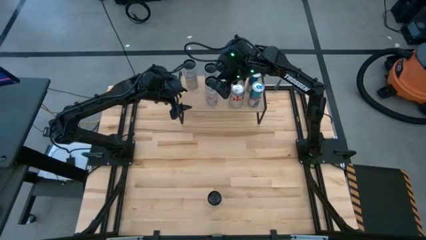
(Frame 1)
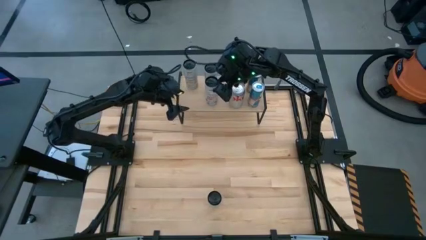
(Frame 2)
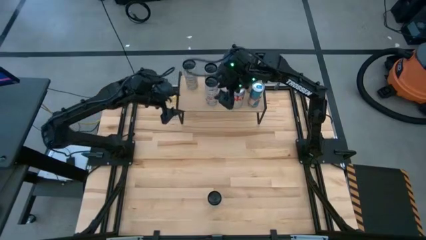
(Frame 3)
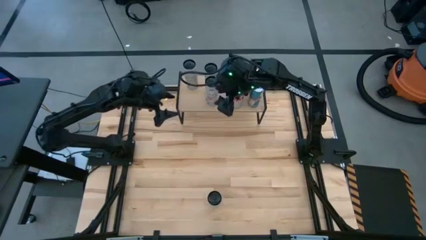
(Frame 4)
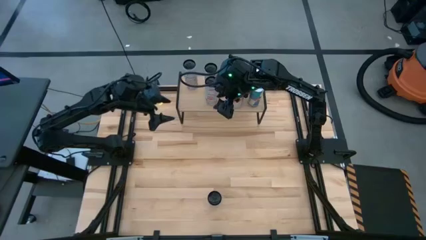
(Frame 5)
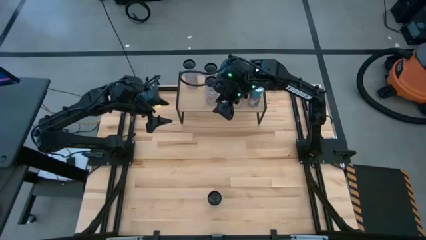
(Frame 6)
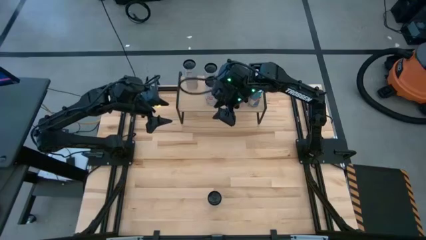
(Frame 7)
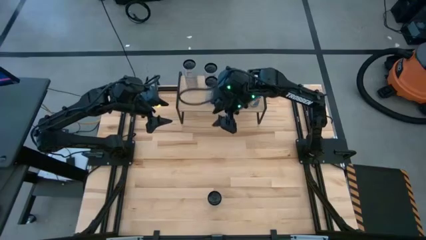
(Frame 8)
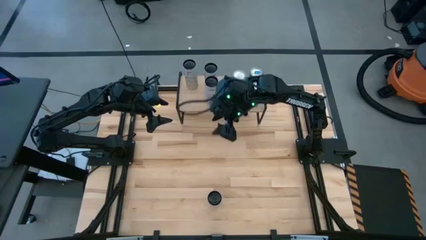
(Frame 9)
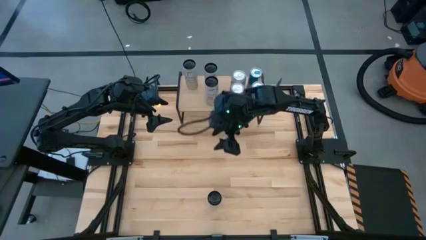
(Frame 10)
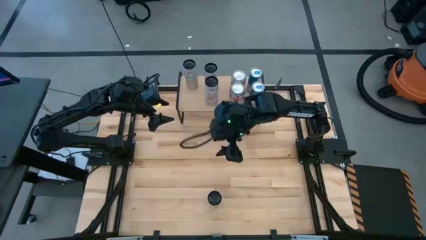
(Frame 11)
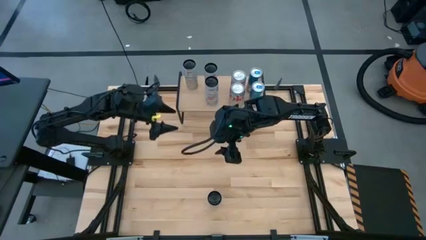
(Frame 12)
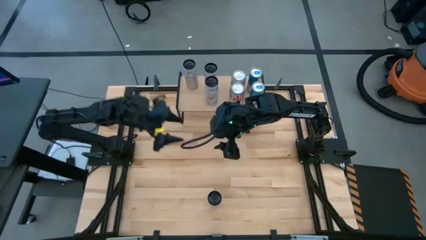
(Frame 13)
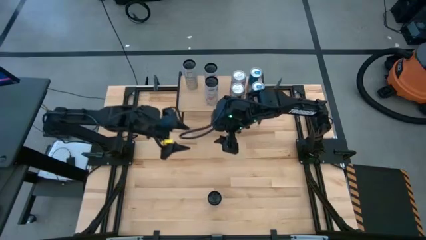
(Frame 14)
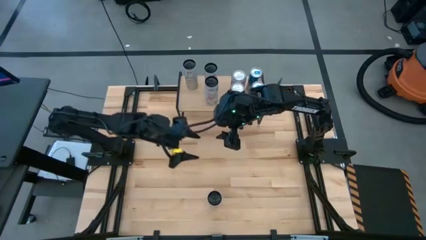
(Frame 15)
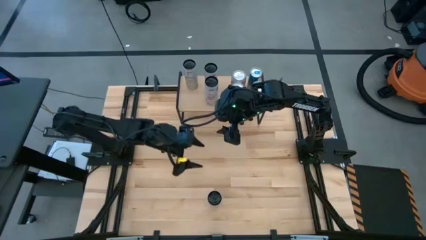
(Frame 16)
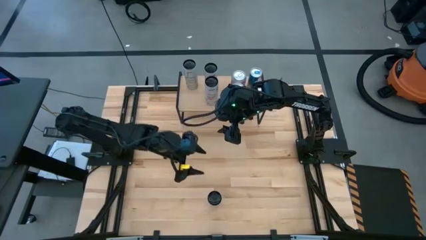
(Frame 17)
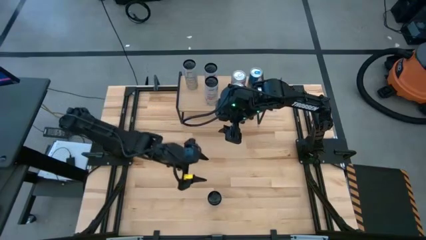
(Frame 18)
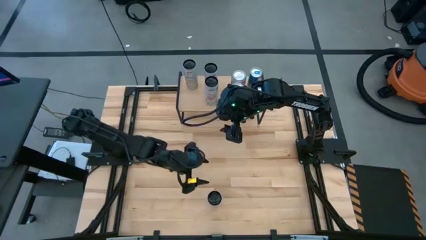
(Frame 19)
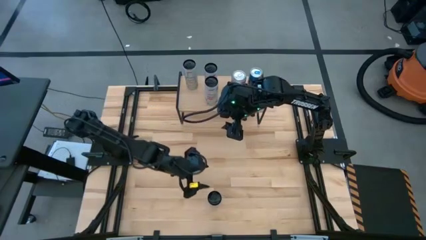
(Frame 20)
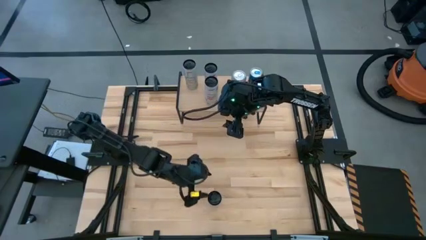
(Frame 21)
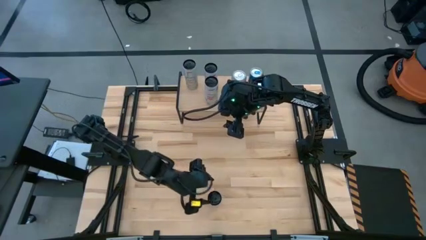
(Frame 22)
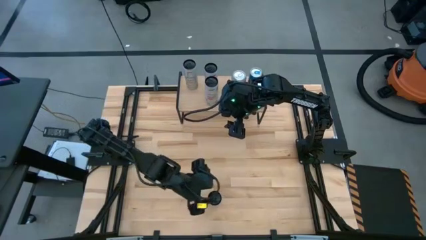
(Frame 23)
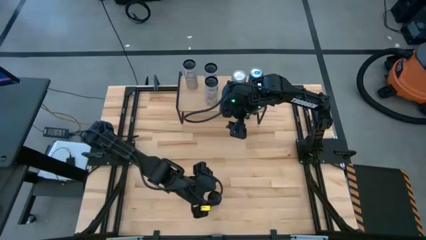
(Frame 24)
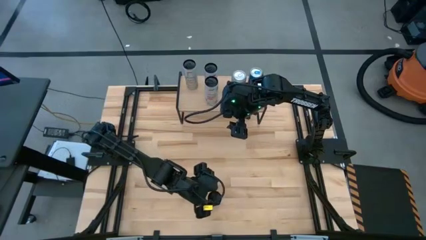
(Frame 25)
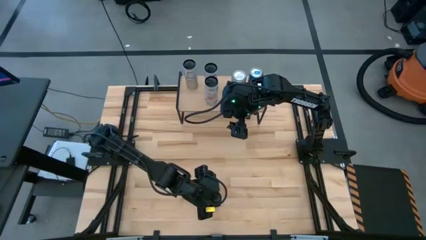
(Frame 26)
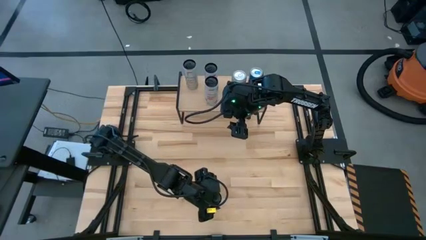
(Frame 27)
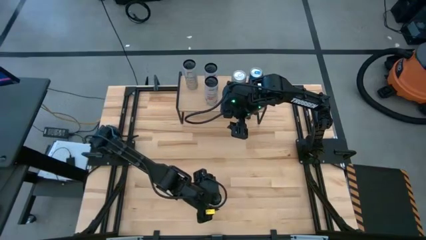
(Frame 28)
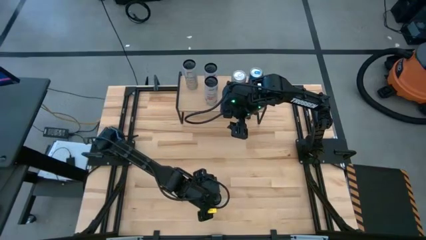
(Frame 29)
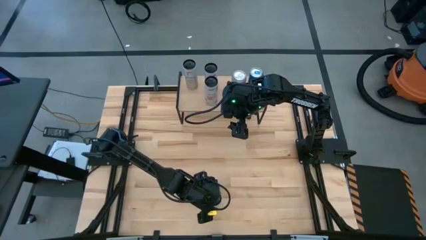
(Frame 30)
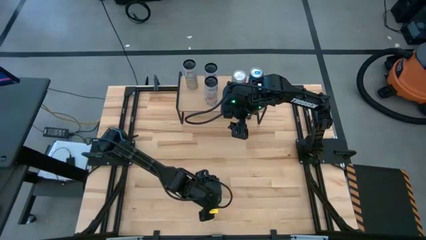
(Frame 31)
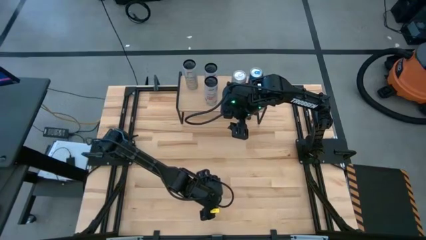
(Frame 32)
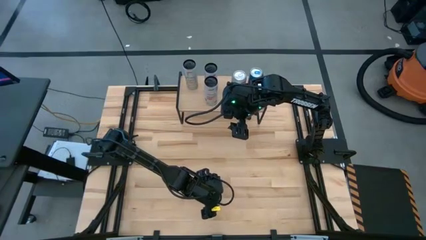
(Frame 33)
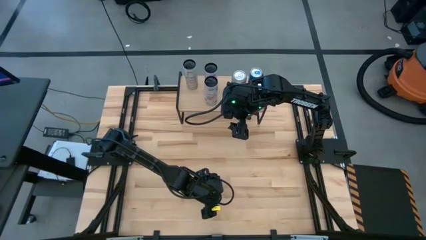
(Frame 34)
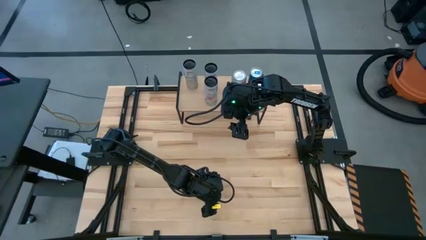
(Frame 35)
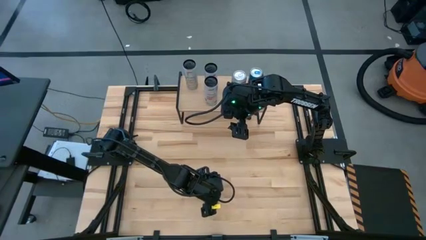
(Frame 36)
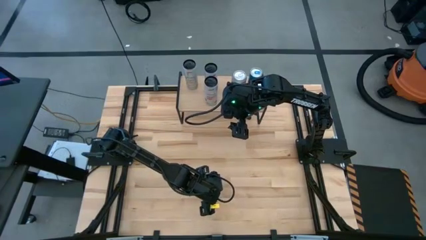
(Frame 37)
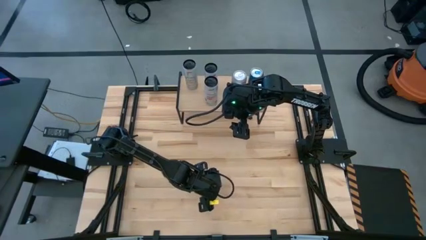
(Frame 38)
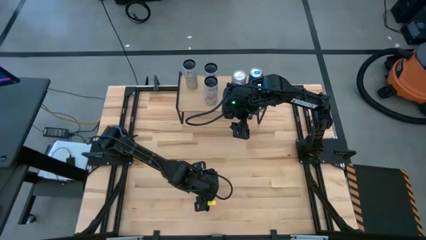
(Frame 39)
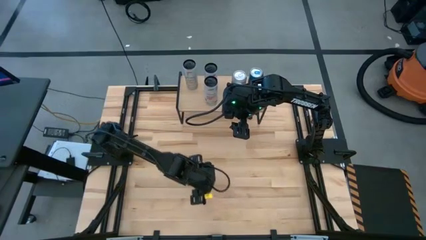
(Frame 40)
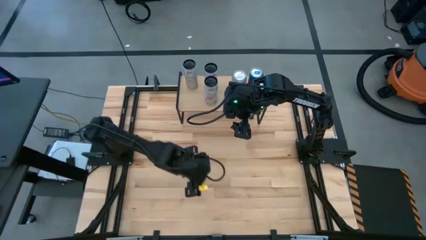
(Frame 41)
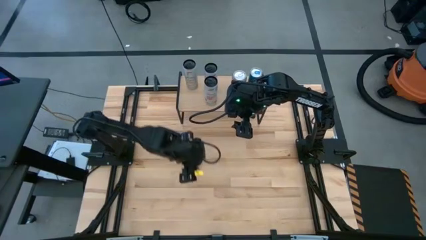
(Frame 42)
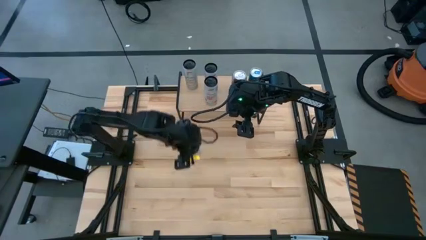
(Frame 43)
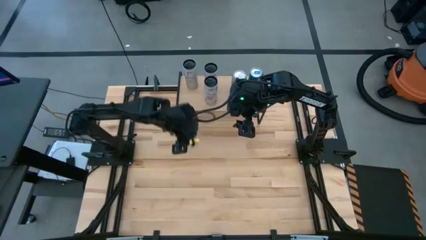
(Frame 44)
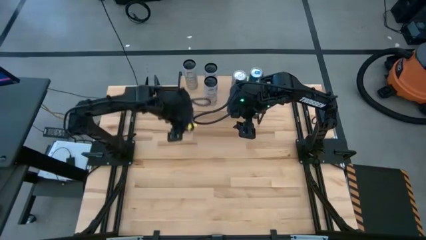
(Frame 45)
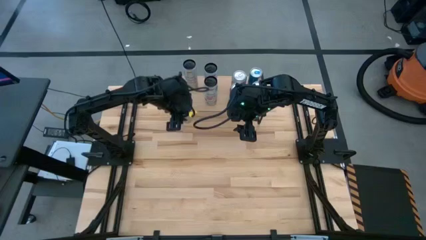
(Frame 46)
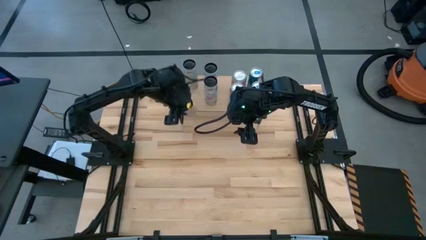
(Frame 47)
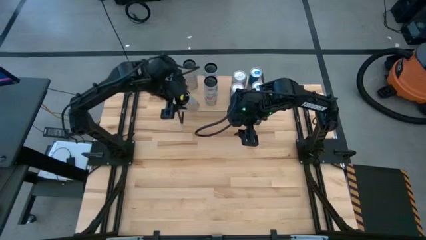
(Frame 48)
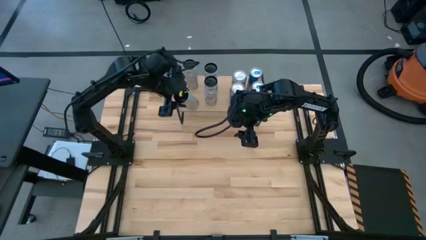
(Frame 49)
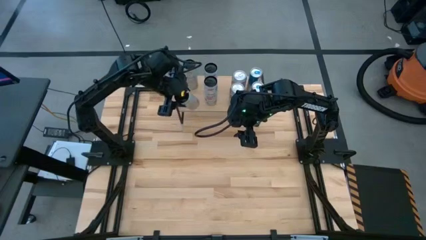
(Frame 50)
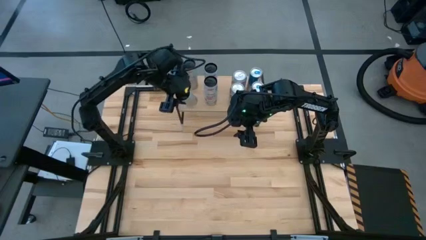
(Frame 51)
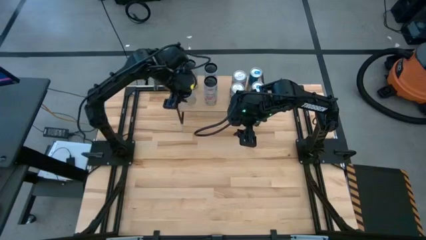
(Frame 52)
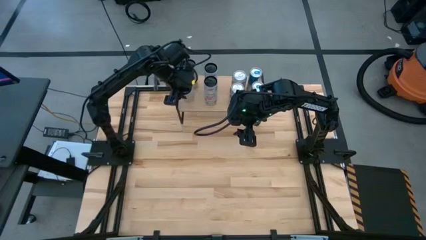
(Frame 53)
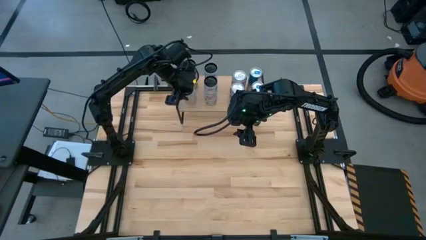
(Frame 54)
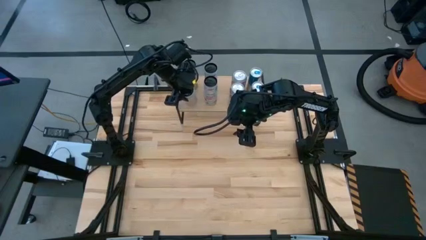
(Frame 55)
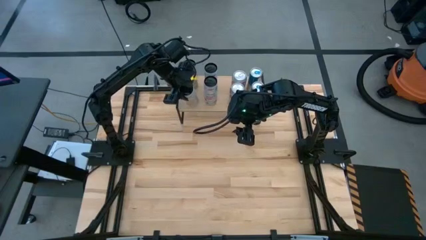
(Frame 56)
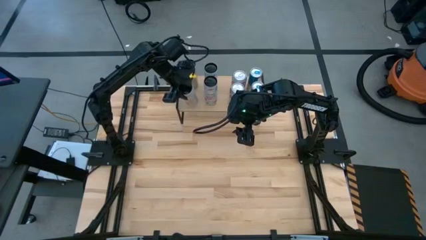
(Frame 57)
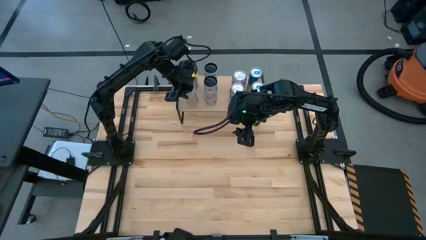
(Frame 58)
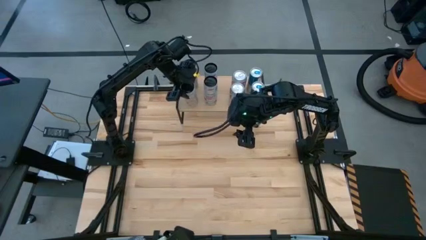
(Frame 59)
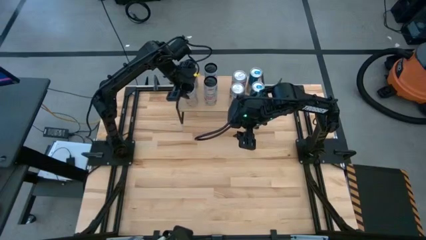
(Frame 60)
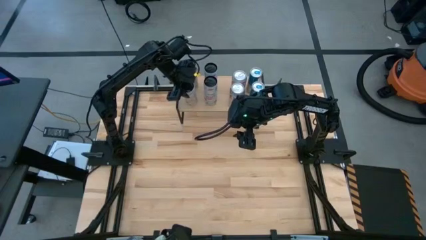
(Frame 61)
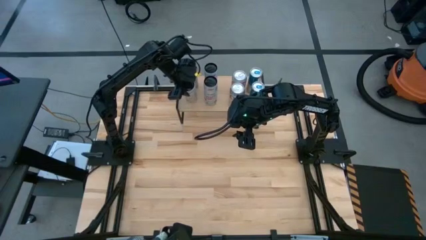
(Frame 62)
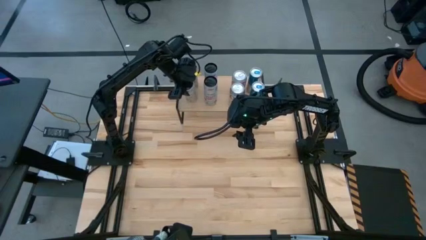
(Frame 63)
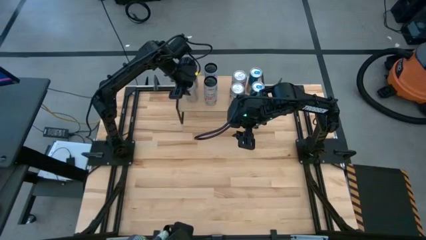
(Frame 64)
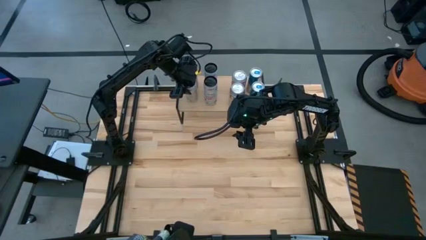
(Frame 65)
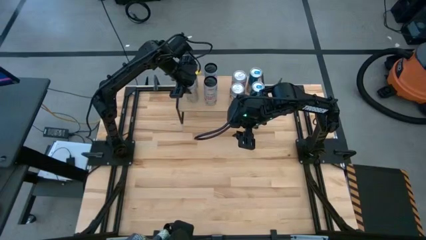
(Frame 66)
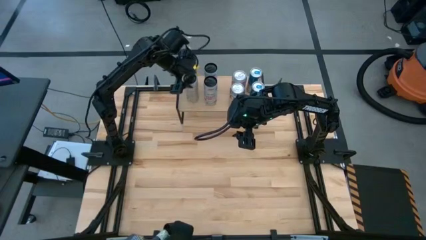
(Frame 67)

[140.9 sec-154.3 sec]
Task: Place canned beverage on shelf
Put the white soda can aligned with the other white soda can on the shelf
